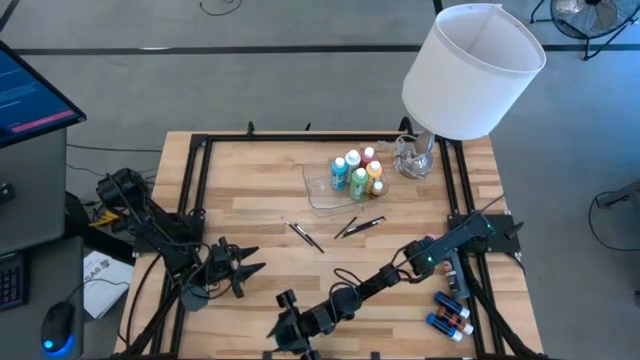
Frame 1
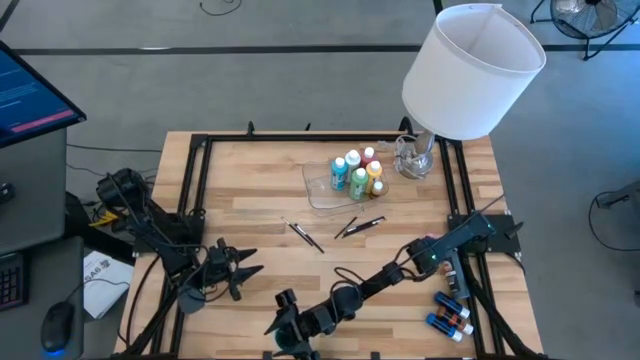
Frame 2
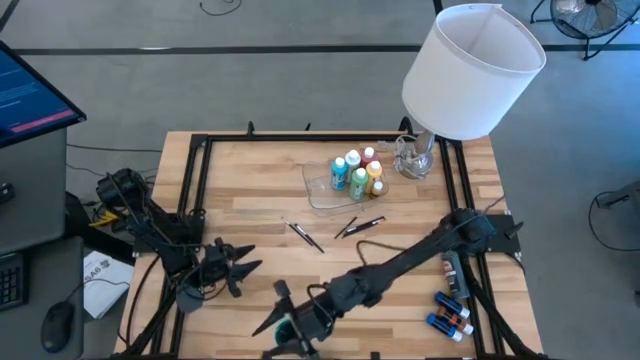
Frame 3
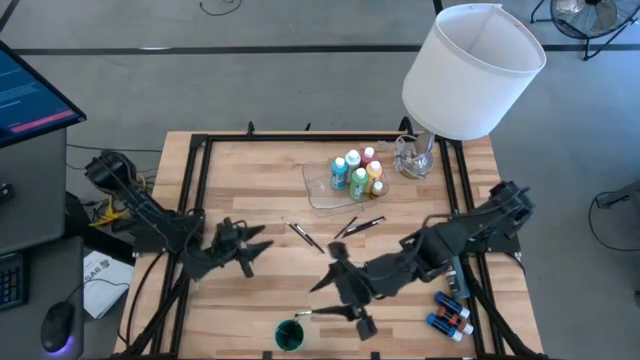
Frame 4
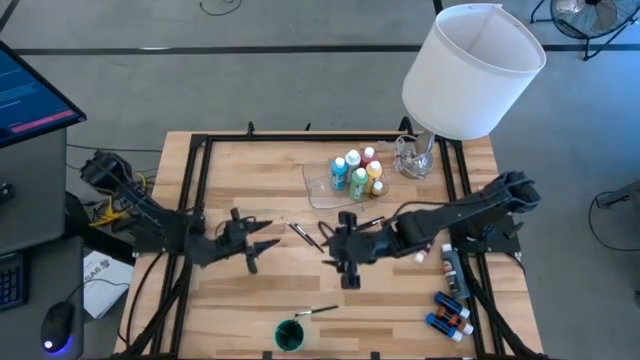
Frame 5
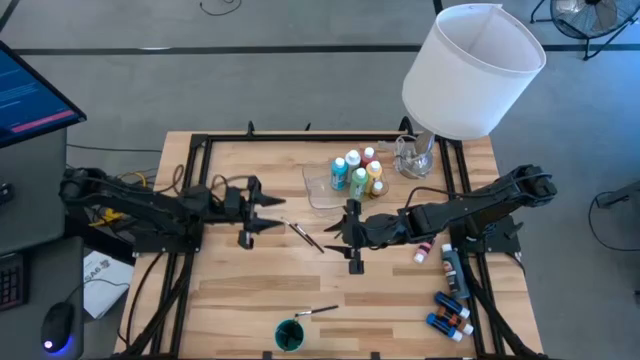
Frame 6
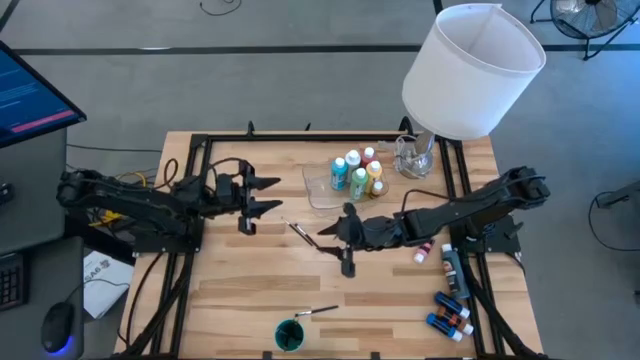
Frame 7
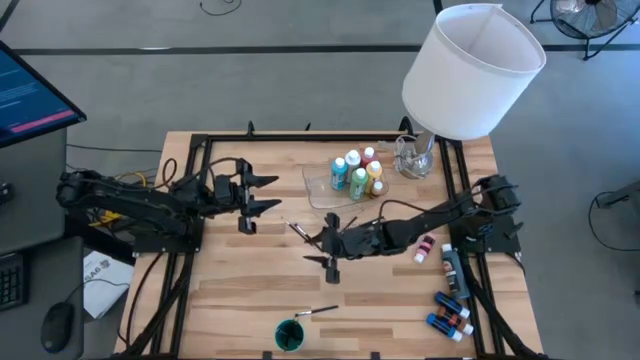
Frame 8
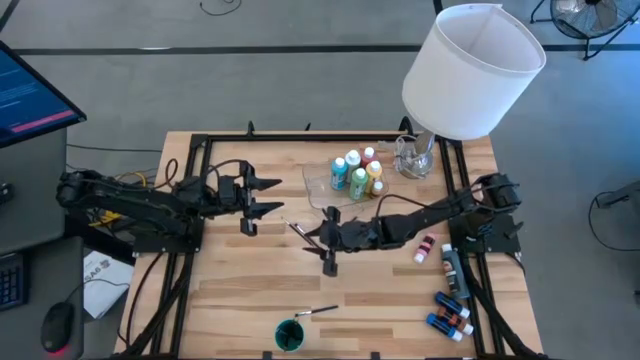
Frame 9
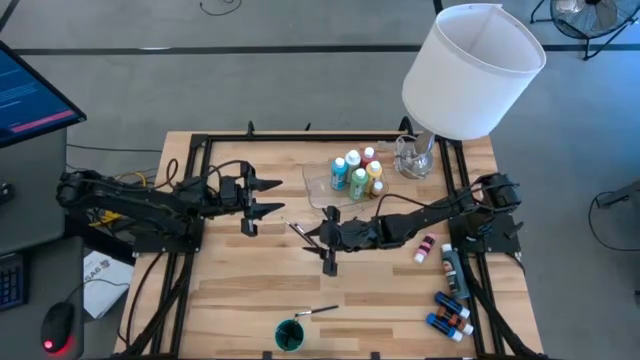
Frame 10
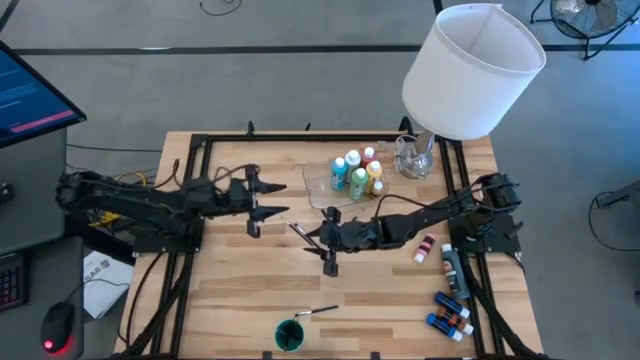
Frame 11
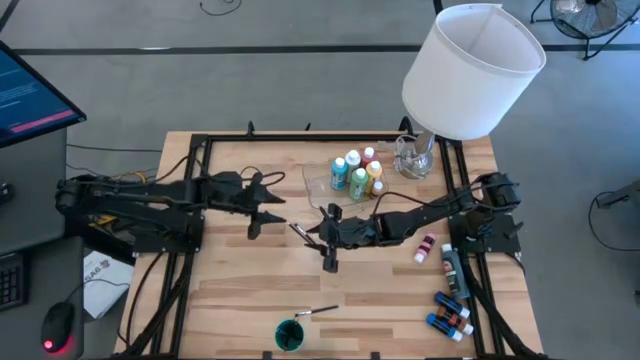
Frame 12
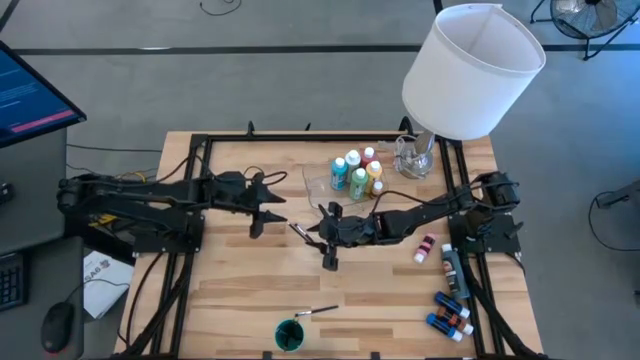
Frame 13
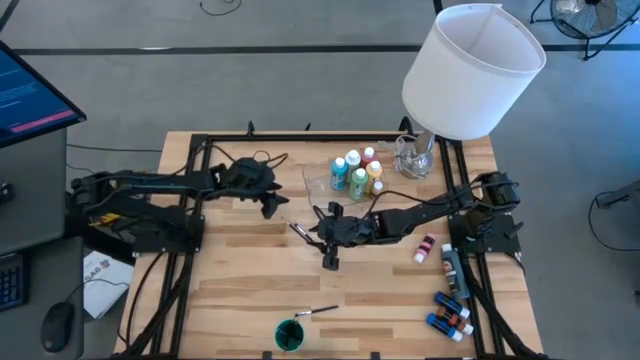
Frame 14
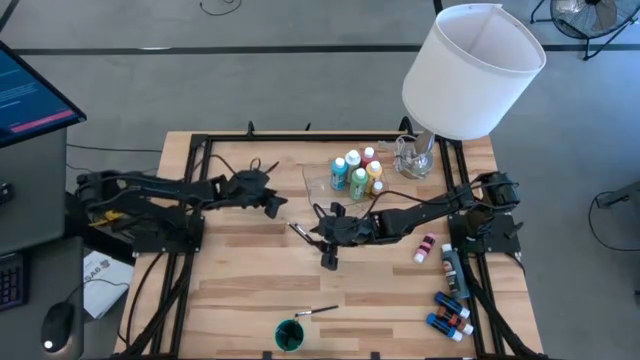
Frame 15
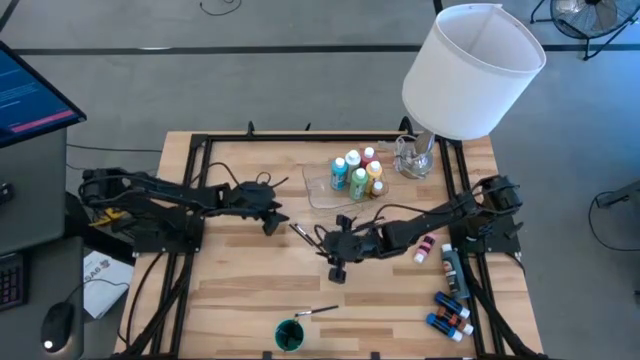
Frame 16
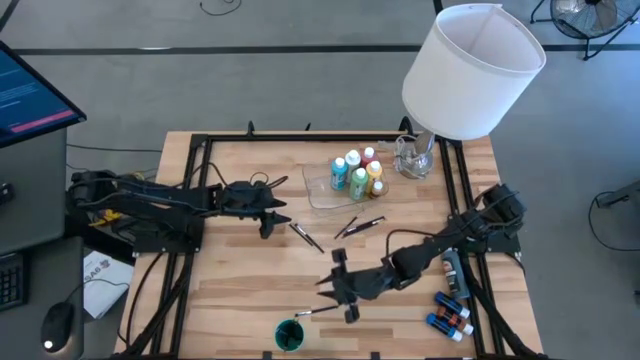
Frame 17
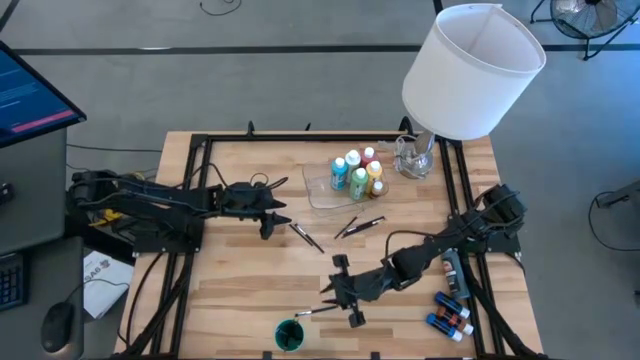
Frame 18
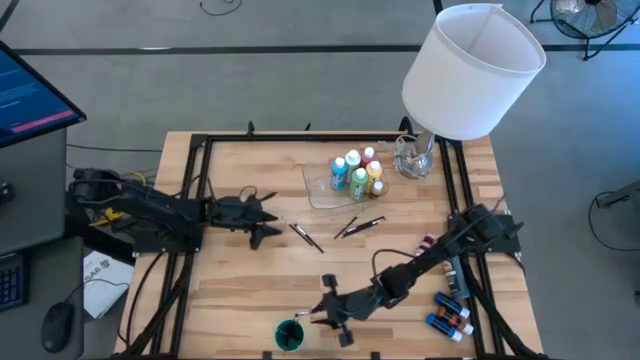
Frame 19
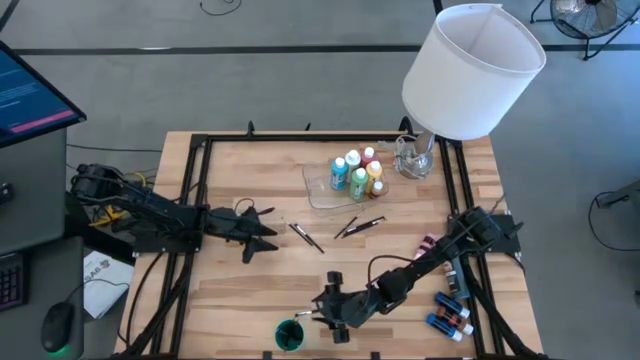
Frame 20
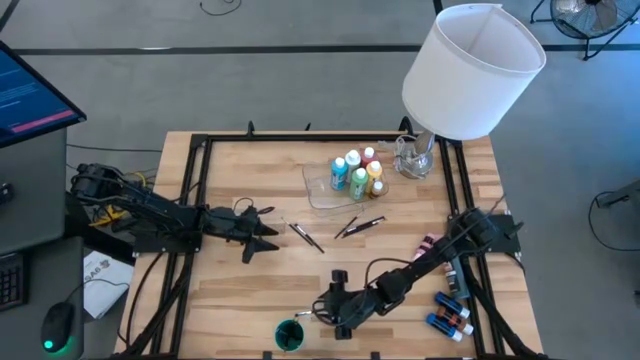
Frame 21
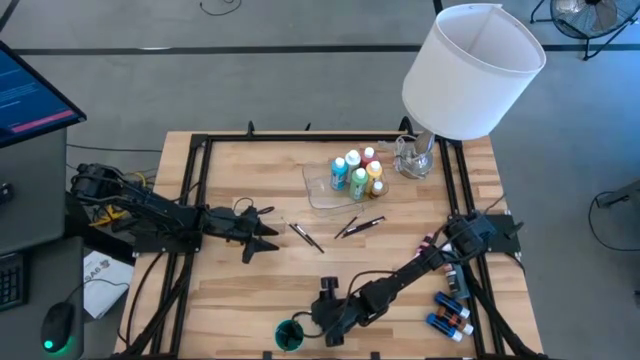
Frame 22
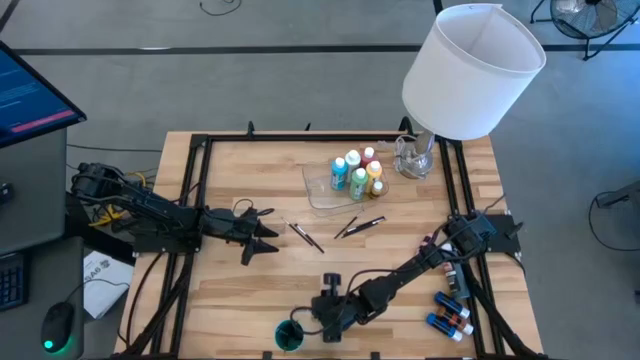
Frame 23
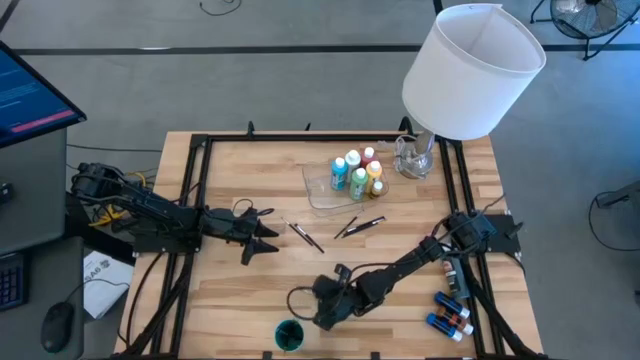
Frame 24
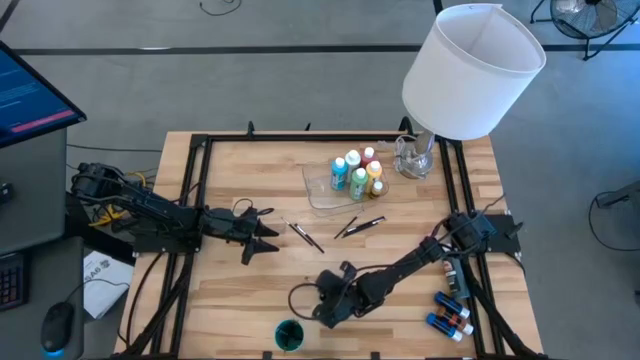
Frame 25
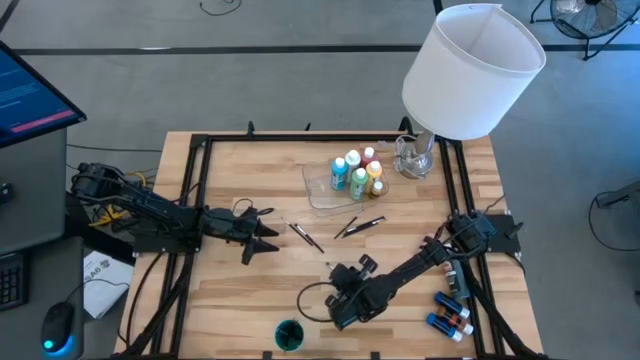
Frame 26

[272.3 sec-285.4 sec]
Task: Pick & Place Paint Supplies
Put the silver paintbrush into the green cup
